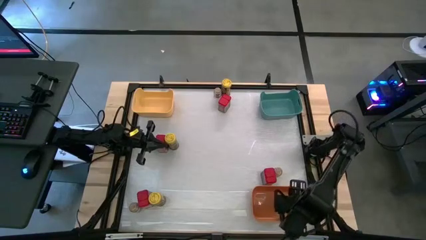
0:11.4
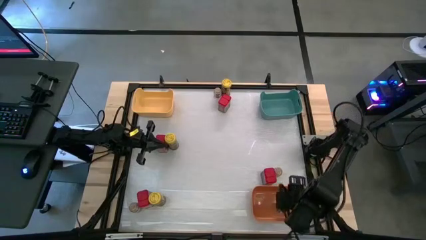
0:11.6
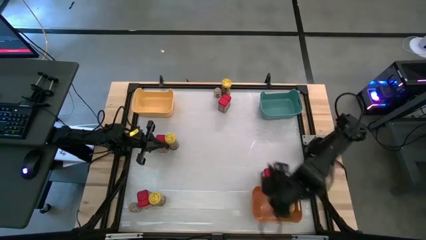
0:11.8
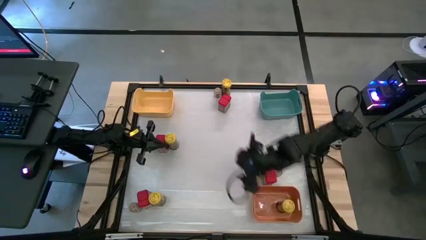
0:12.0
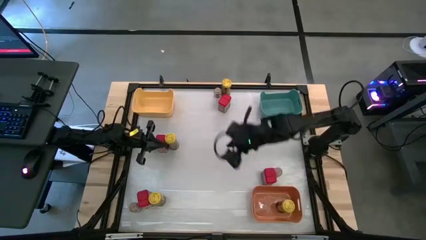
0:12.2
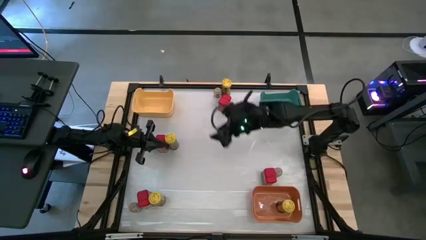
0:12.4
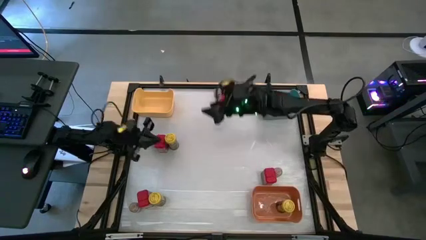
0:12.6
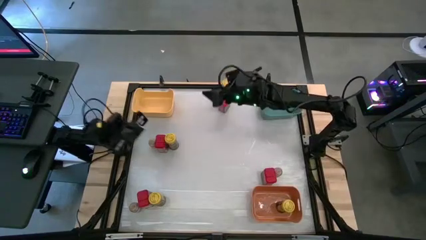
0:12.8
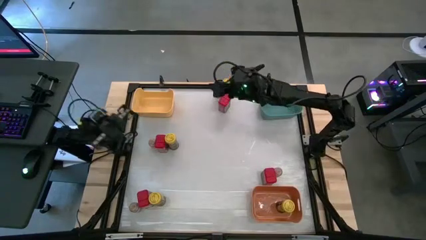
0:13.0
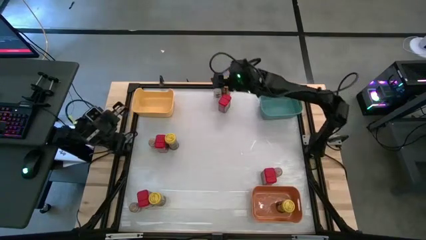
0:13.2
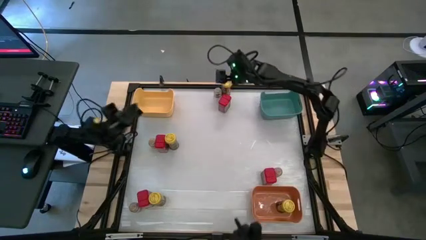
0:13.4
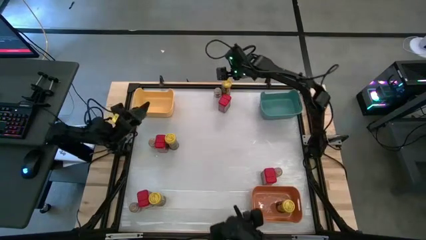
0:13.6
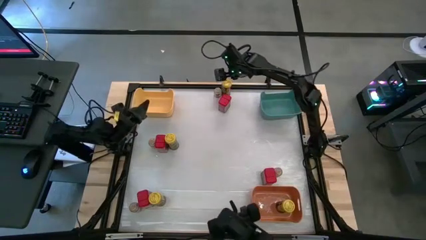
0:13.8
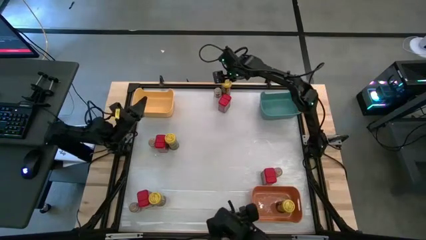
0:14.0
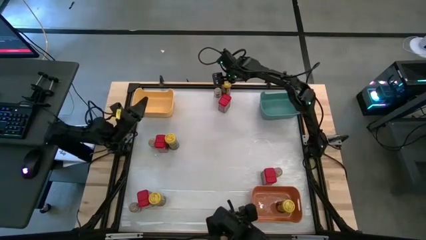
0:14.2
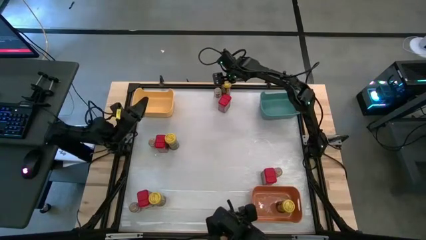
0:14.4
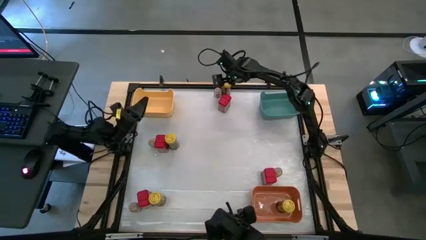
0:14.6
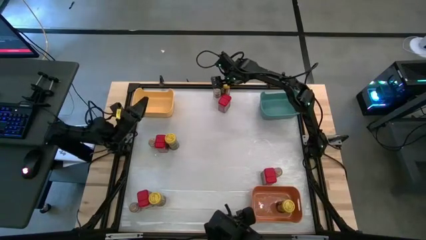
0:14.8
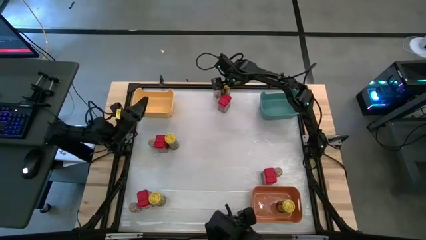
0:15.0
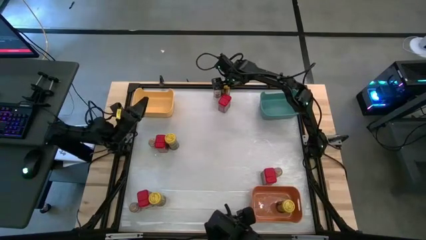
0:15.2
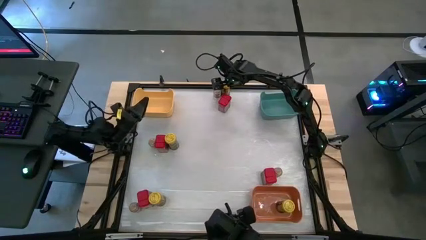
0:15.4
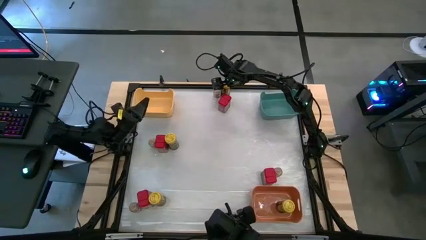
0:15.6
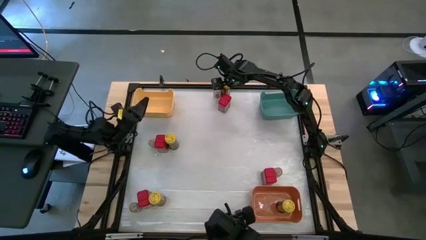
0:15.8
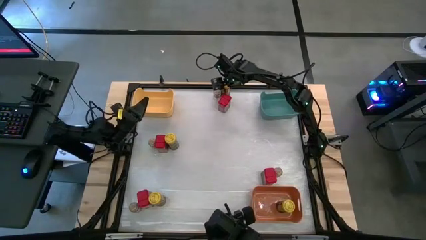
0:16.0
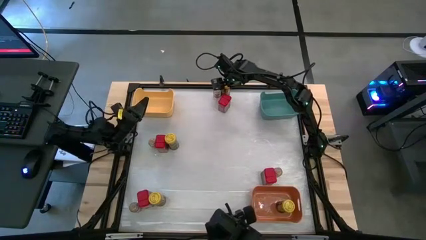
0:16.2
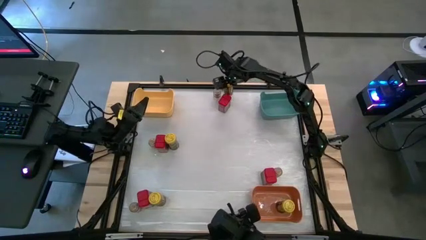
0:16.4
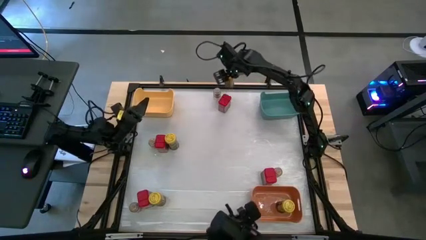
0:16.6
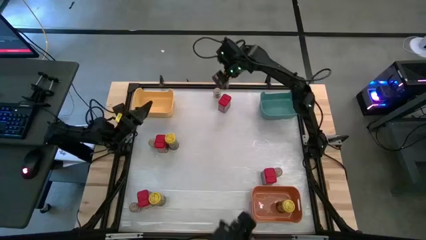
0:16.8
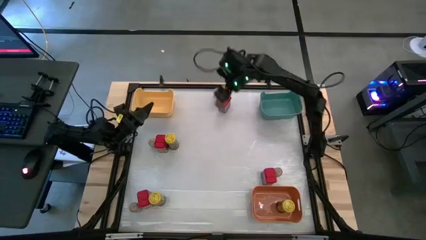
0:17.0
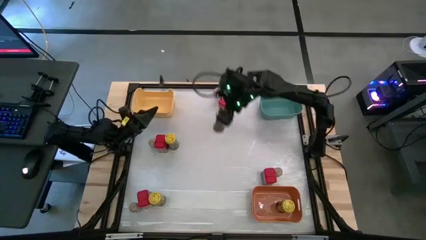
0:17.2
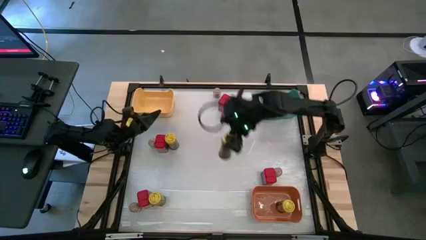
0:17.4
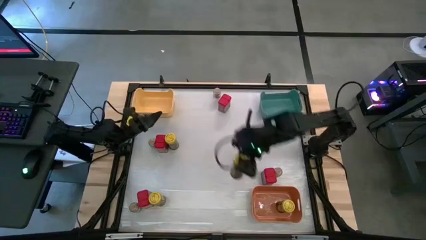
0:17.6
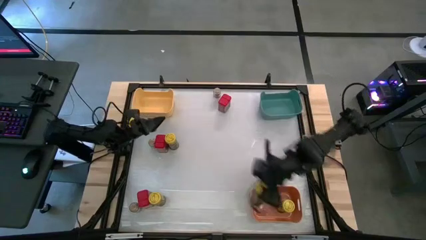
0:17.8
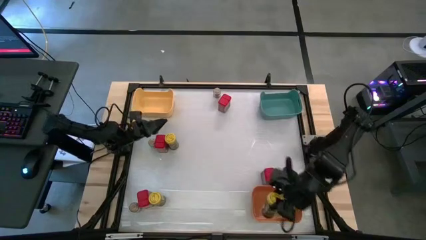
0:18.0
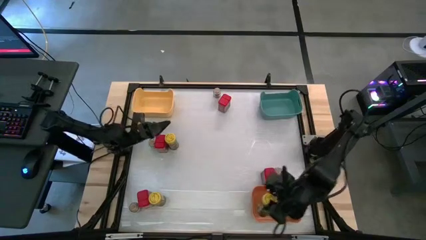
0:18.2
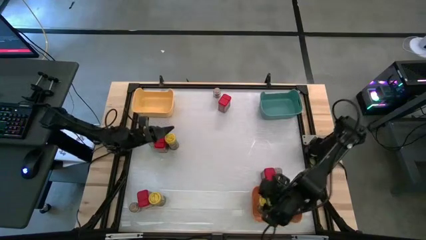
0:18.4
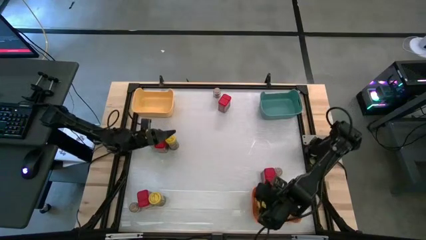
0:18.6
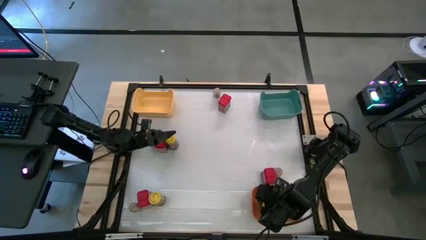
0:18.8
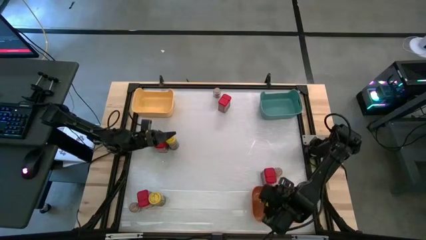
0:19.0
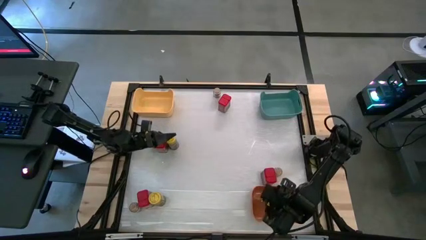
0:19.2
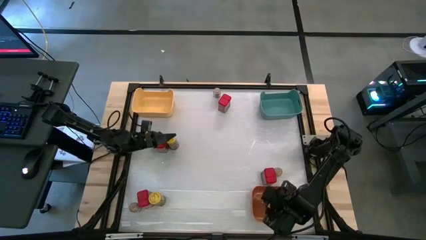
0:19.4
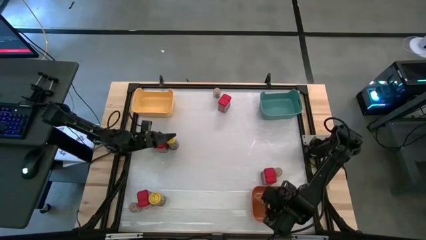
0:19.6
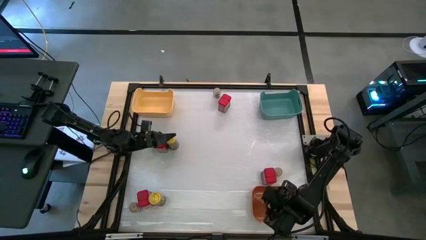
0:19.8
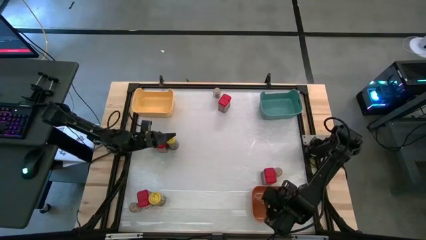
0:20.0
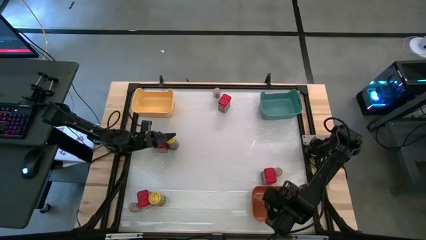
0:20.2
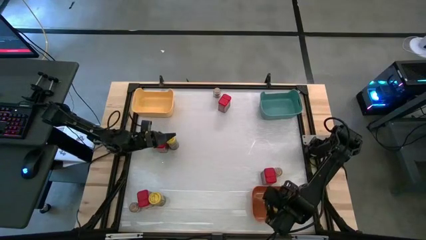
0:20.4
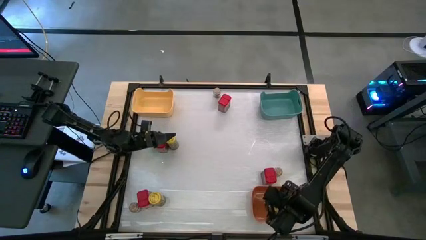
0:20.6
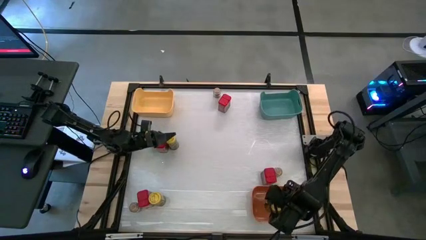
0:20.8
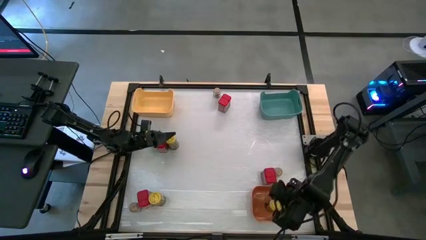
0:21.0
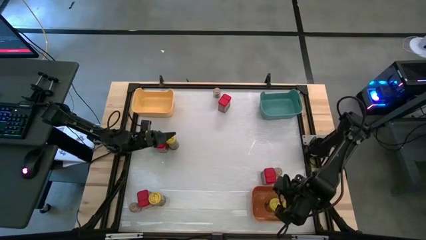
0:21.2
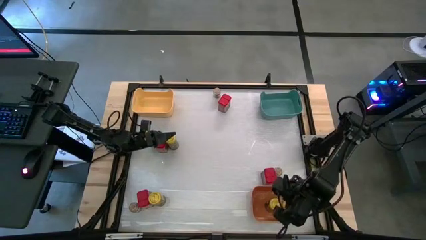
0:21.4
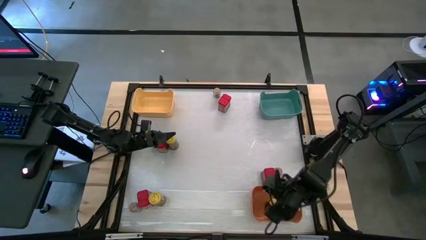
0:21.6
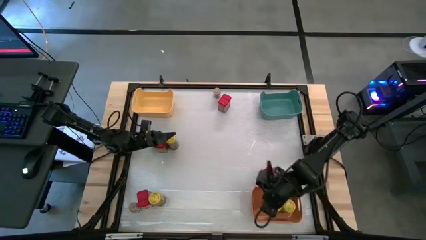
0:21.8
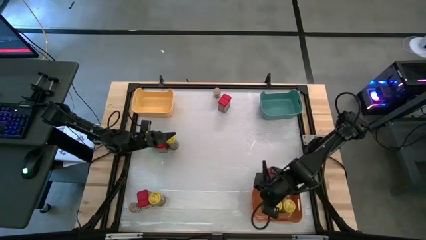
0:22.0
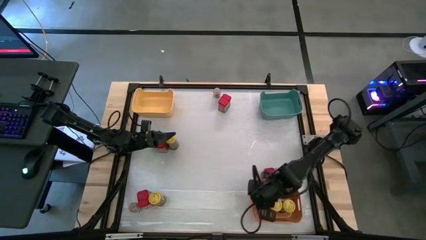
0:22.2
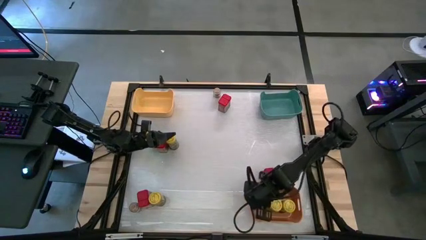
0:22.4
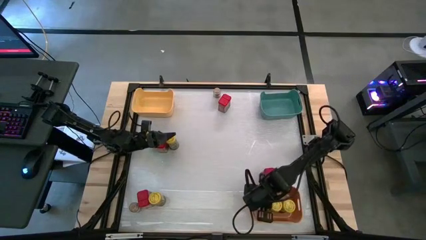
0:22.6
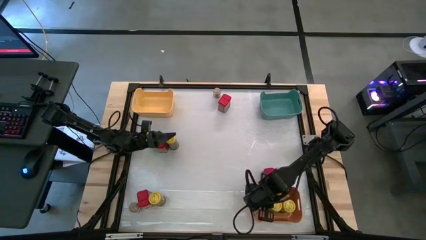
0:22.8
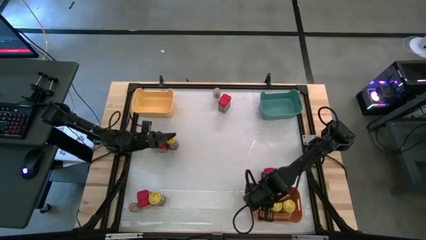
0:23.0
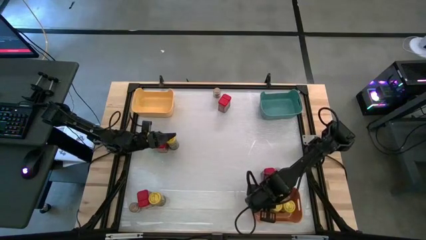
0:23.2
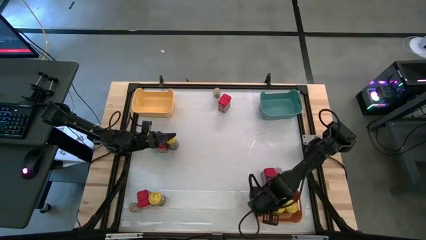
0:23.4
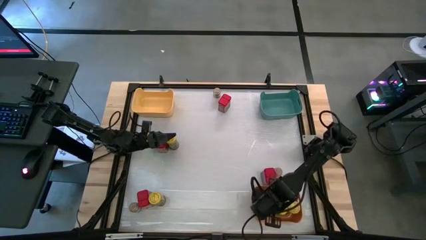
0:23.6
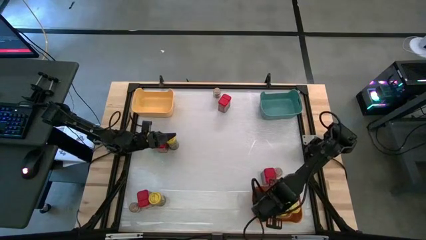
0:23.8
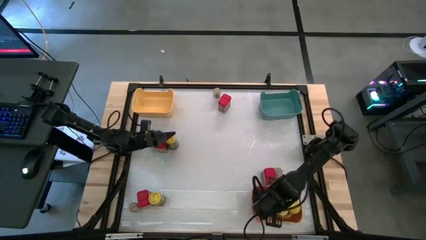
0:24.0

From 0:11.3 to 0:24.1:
Task: Sort spices by type
Put the top yellow seasoning bottle into the orange bin

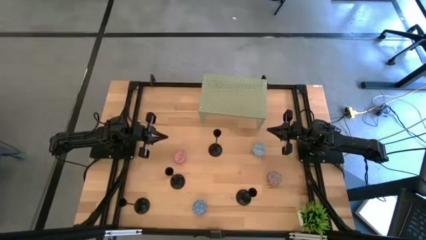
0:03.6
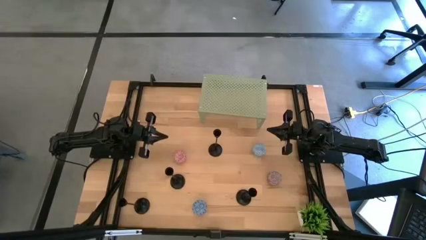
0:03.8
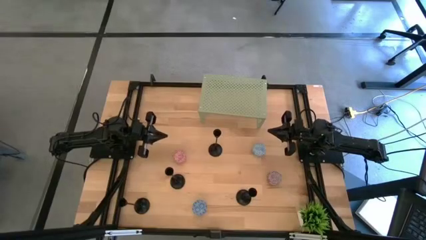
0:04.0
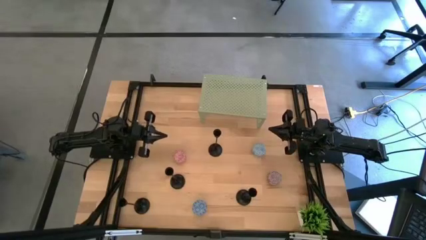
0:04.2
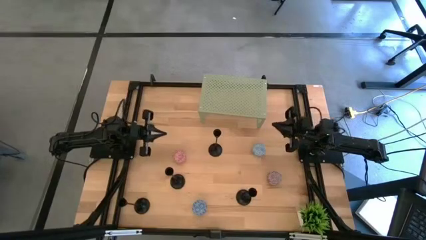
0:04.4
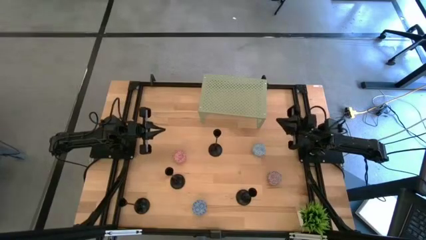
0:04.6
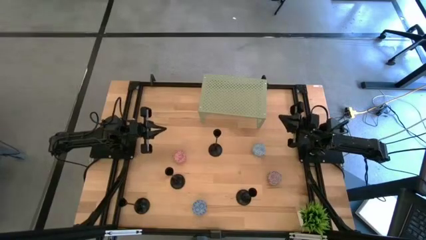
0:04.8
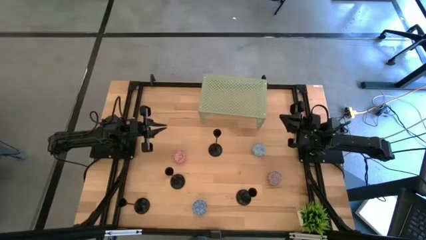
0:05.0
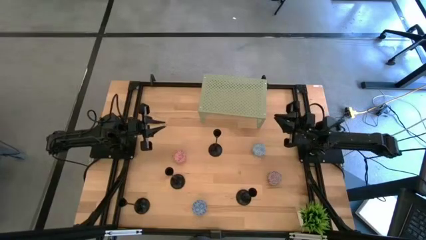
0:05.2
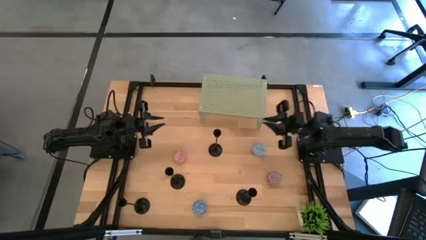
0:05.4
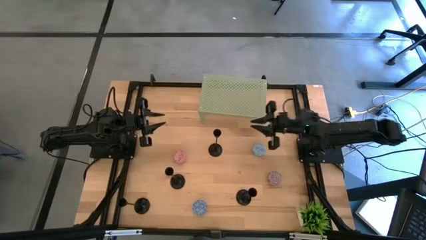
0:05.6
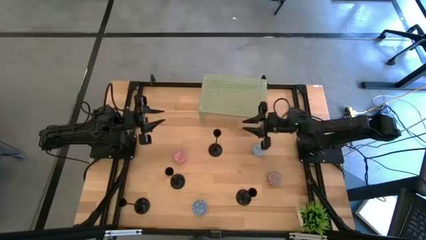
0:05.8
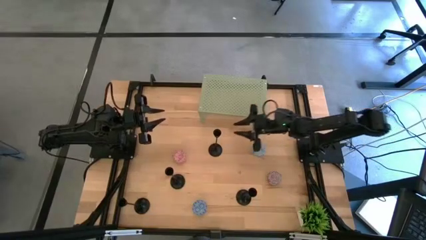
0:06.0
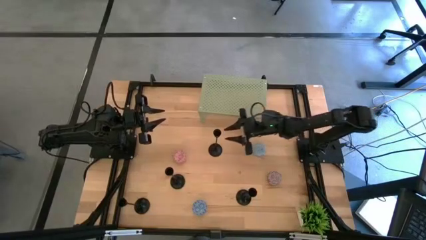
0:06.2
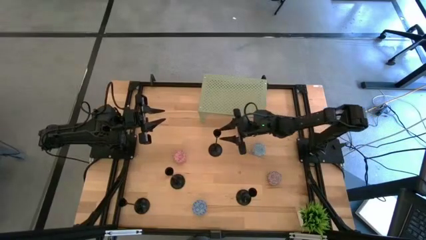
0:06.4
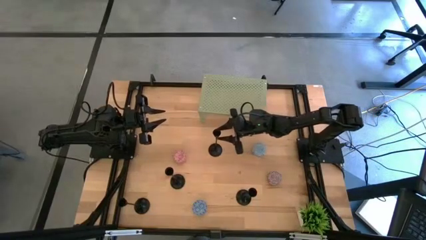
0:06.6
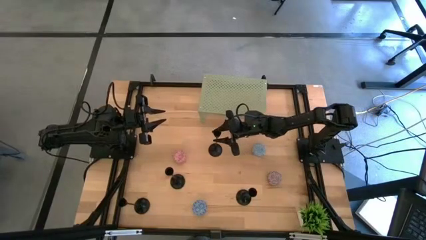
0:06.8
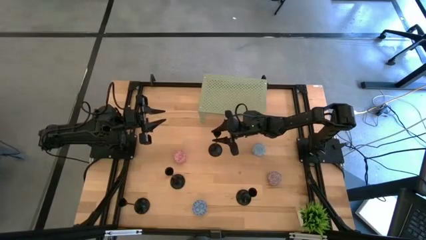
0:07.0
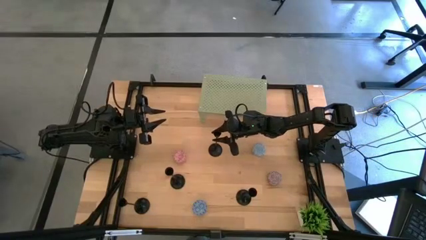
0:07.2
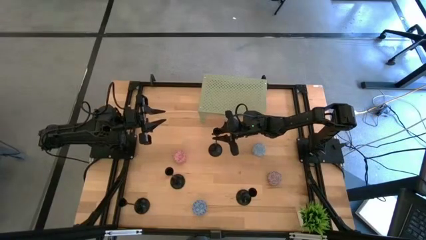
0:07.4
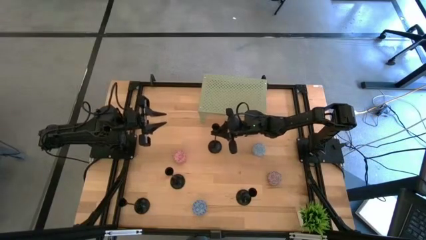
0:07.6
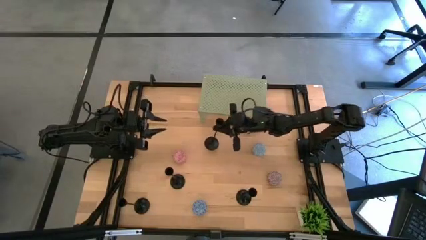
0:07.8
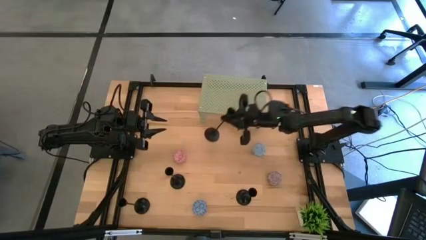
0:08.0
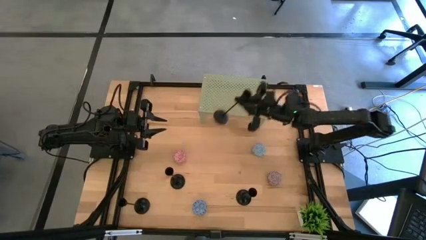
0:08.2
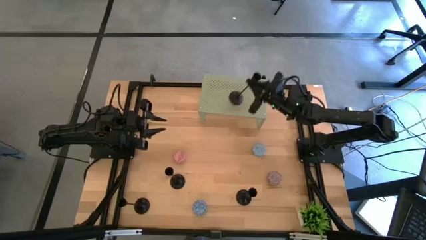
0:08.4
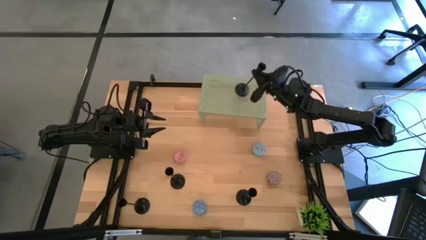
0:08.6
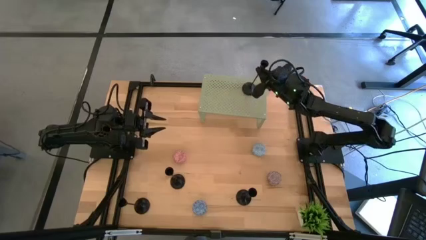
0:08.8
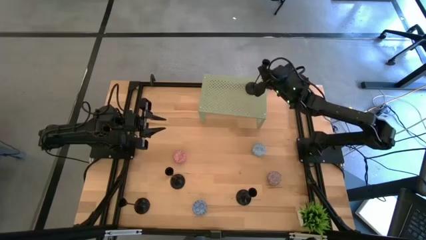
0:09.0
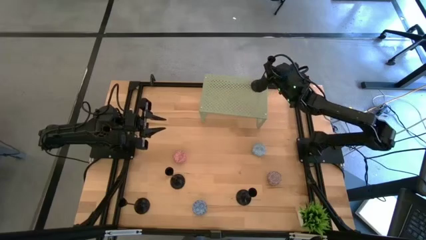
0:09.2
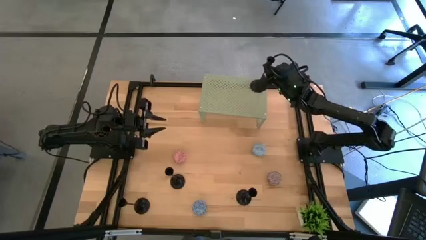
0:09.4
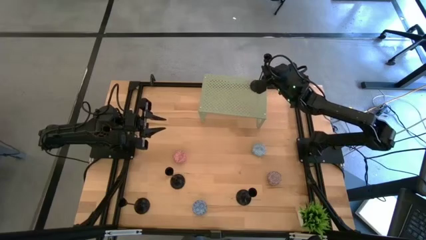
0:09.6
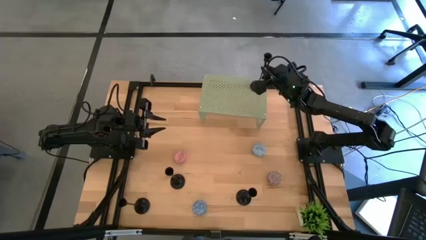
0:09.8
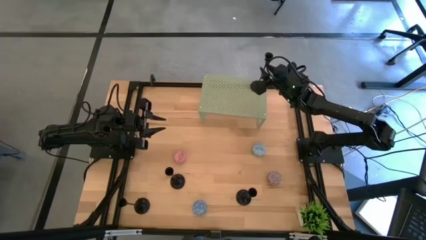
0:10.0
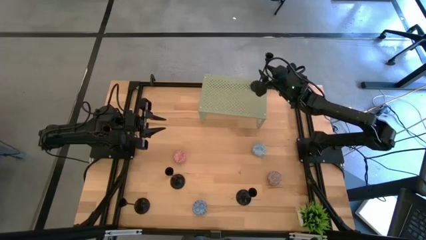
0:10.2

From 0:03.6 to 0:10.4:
Task: Pick & Place candle stick holders
Put the black candle holder on the shelf
